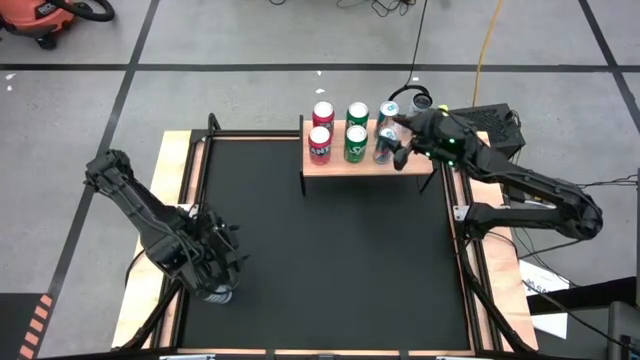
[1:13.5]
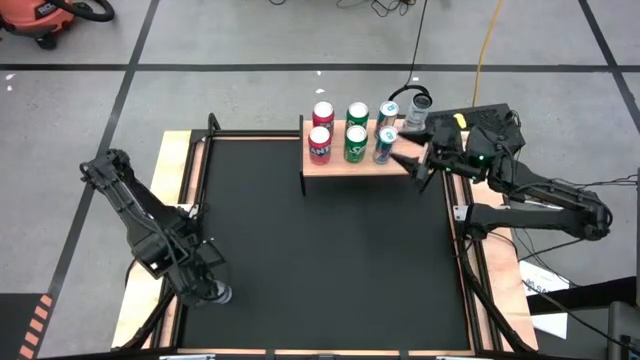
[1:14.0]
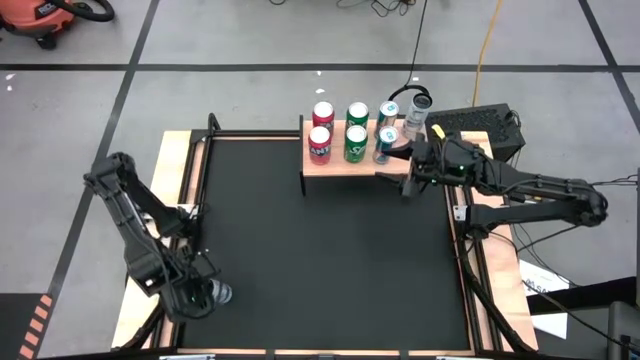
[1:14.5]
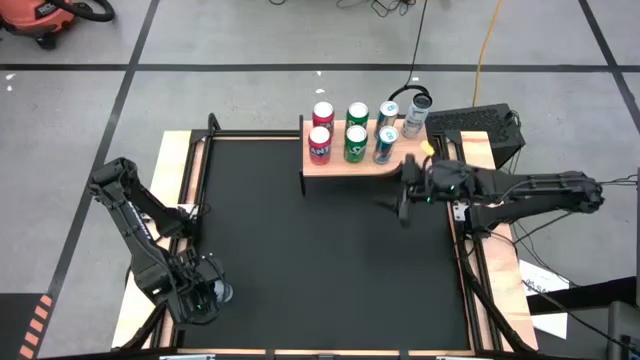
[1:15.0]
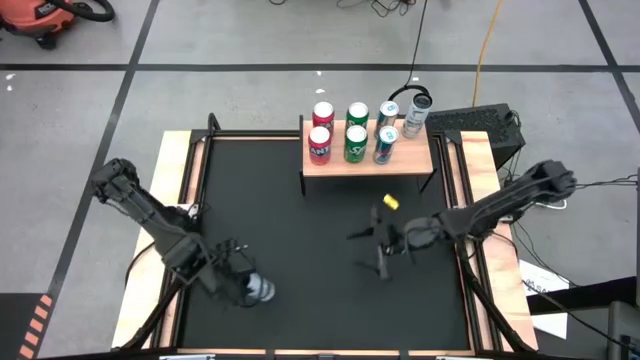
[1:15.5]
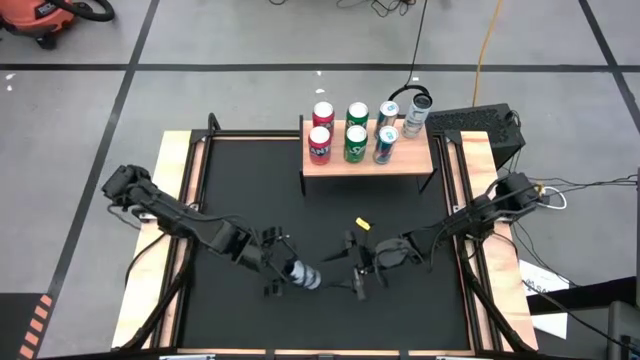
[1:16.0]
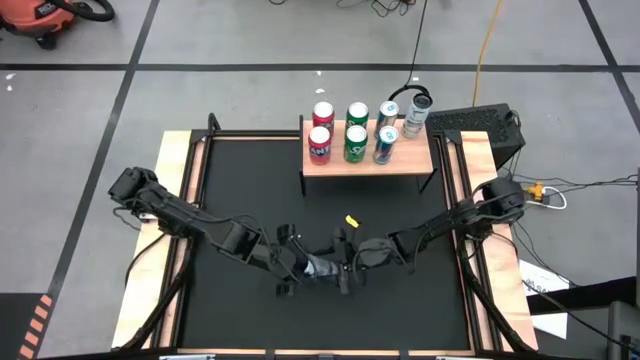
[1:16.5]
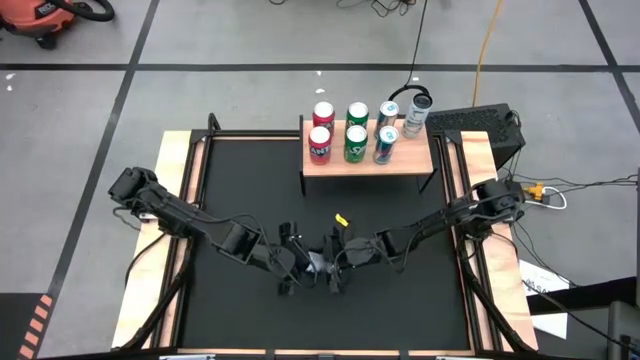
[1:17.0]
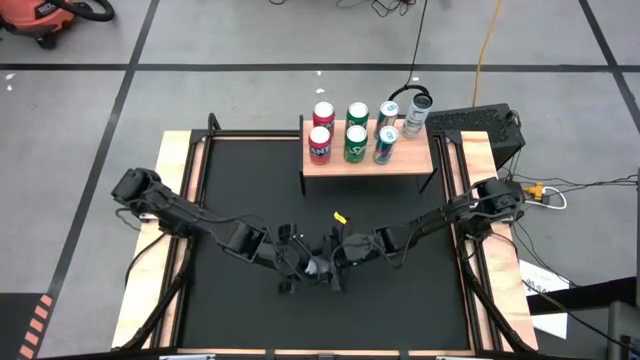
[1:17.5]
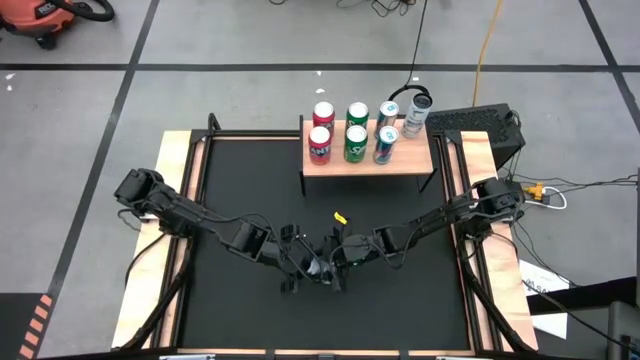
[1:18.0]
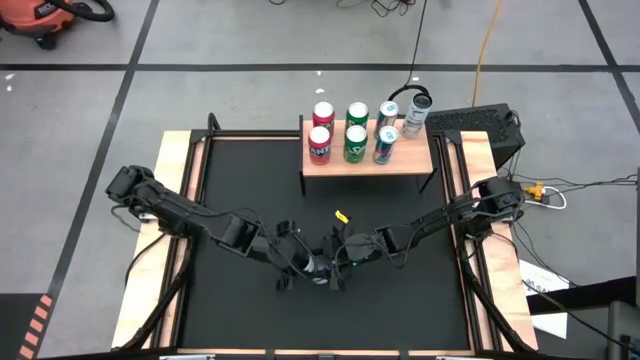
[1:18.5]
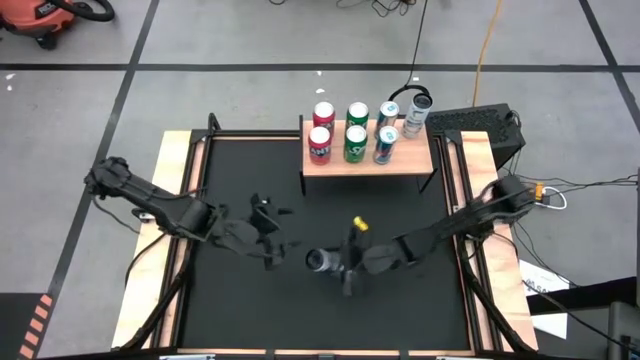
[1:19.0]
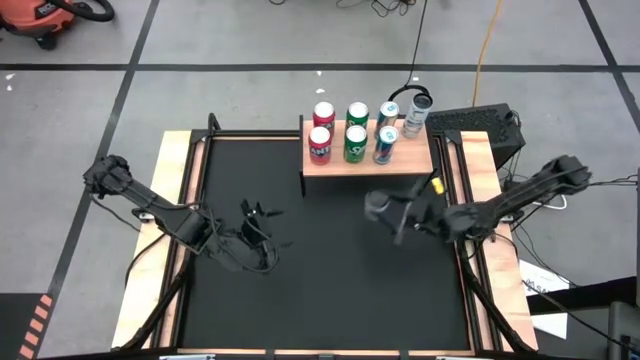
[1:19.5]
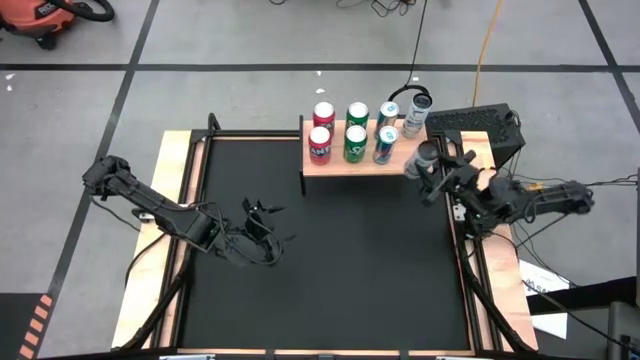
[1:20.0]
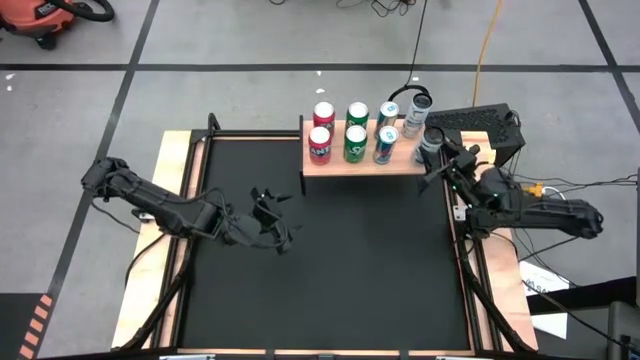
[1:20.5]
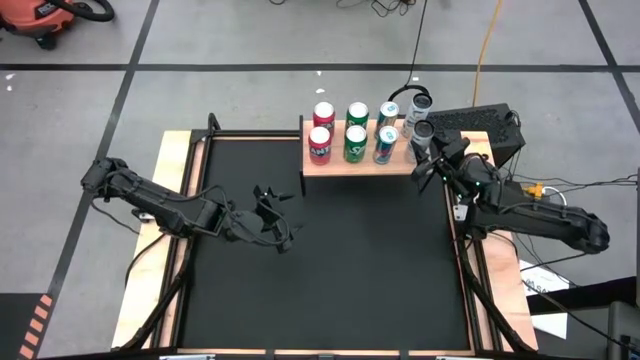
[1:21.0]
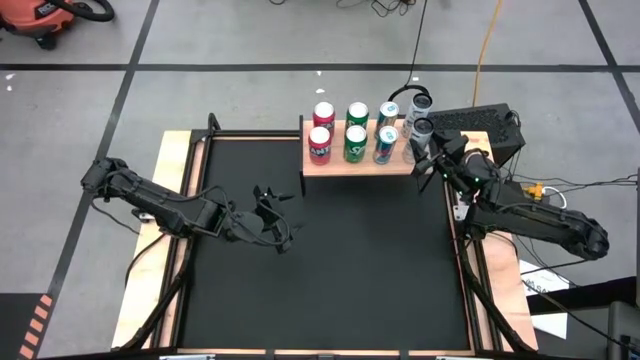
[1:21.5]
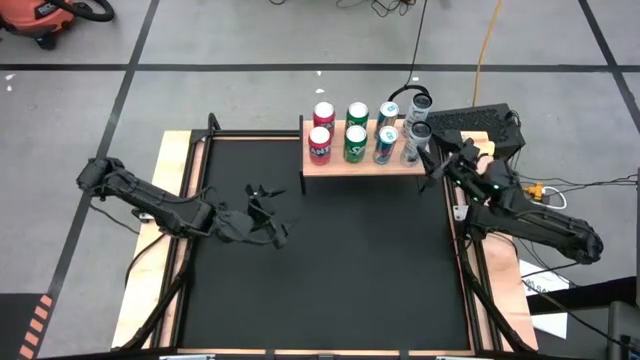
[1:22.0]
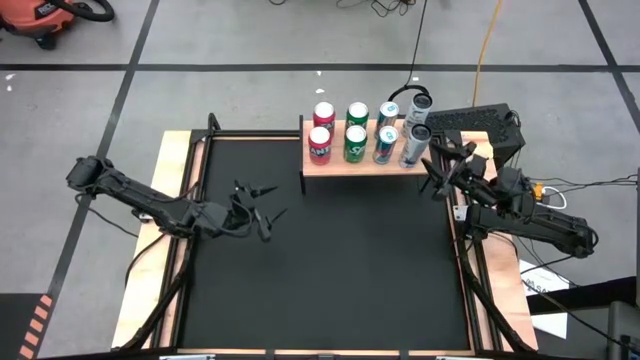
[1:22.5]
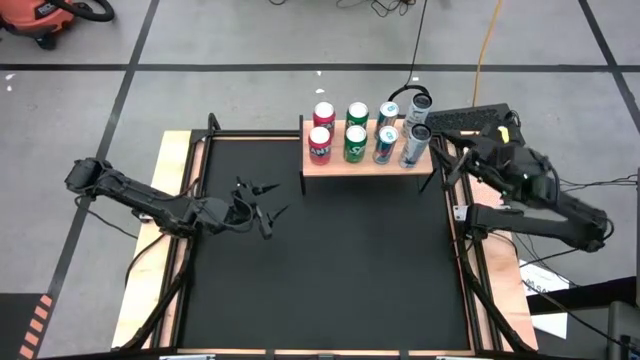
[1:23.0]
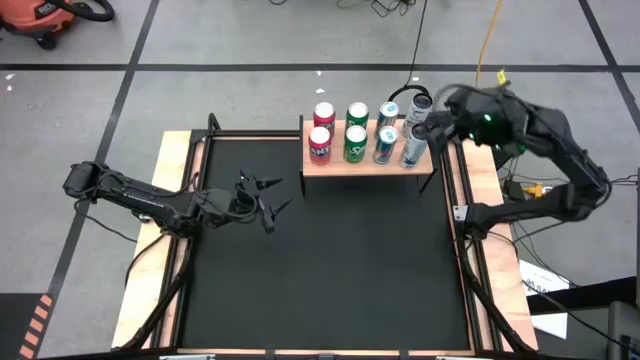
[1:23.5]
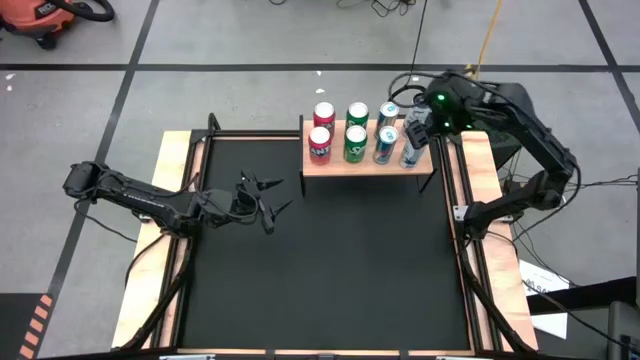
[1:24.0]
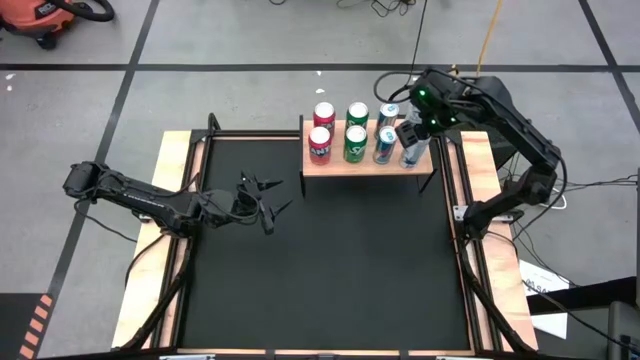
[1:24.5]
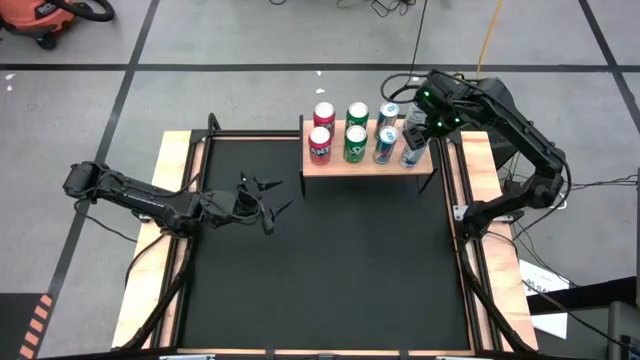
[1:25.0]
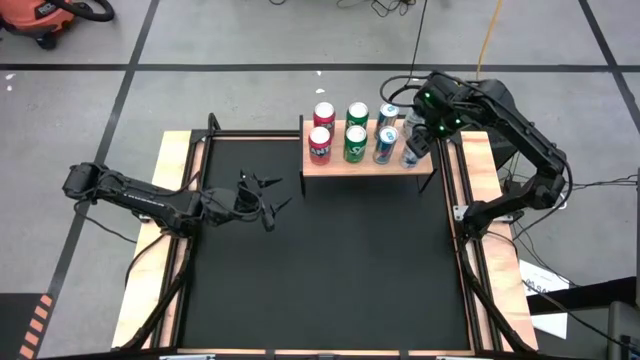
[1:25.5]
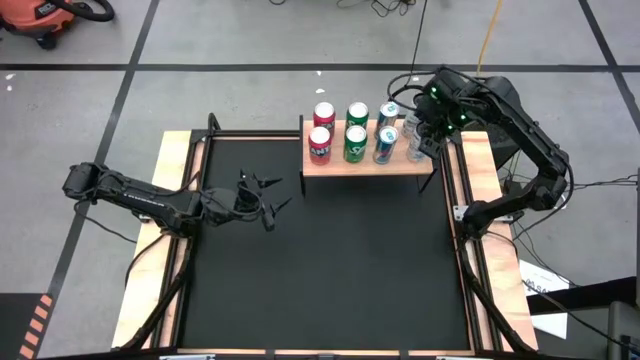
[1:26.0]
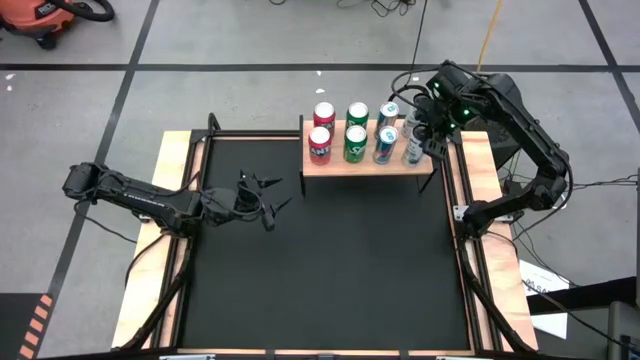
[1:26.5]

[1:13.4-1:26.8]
Task: Place canned beverage on shelf
Put the white blue soda can on the shelf aligned with the other white blue soda can

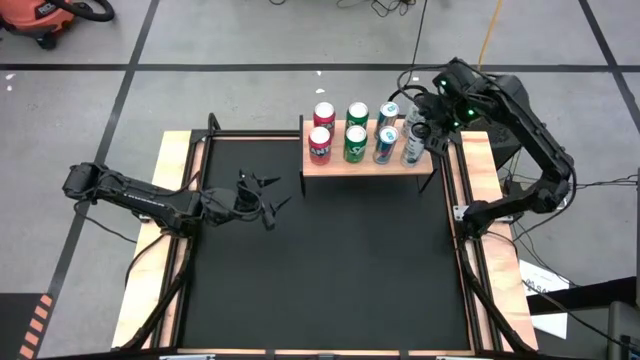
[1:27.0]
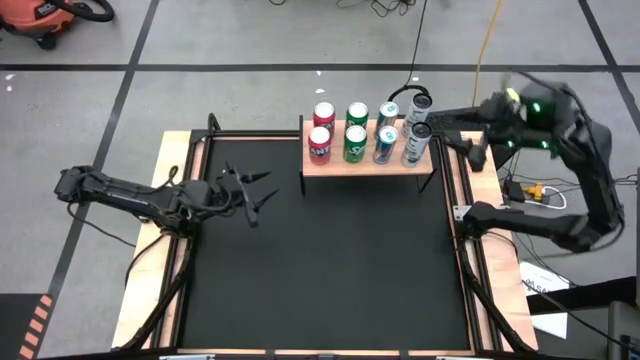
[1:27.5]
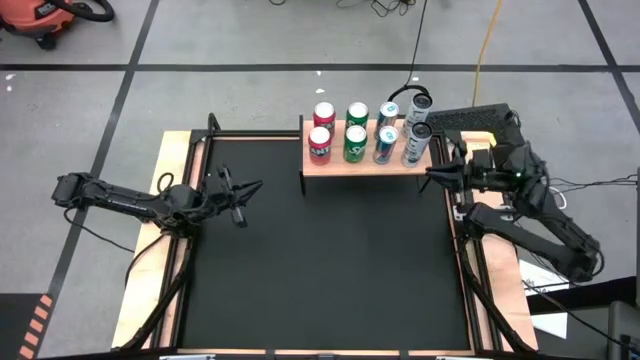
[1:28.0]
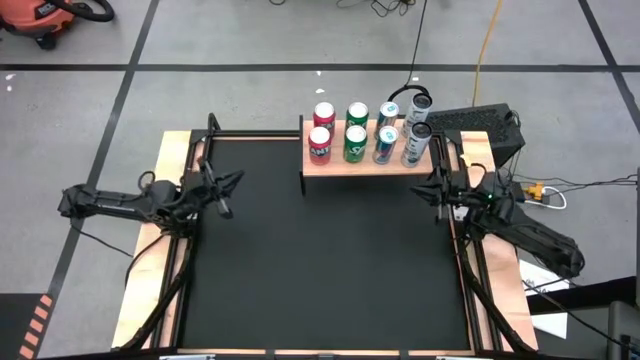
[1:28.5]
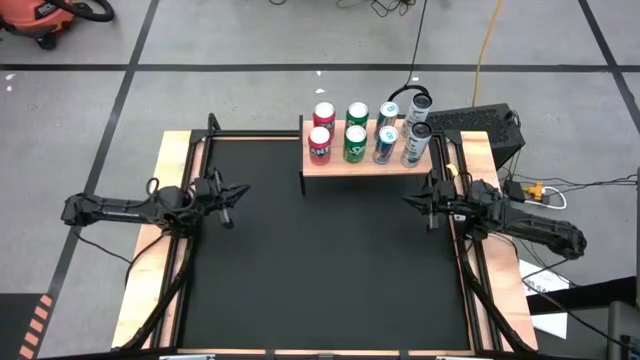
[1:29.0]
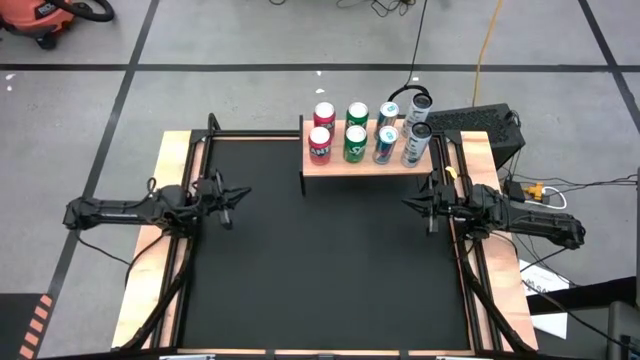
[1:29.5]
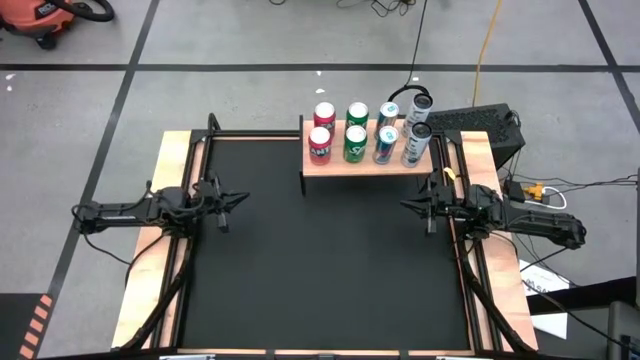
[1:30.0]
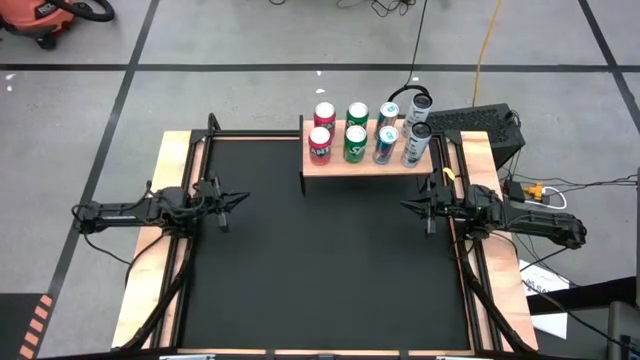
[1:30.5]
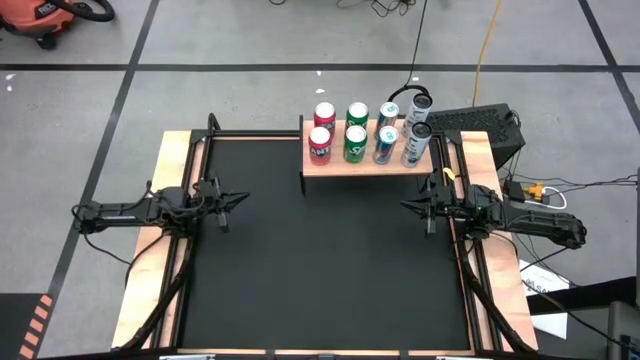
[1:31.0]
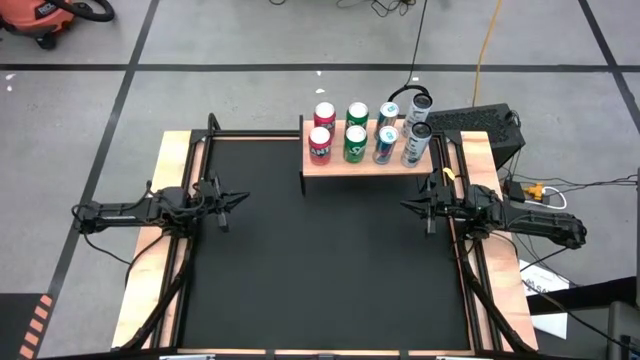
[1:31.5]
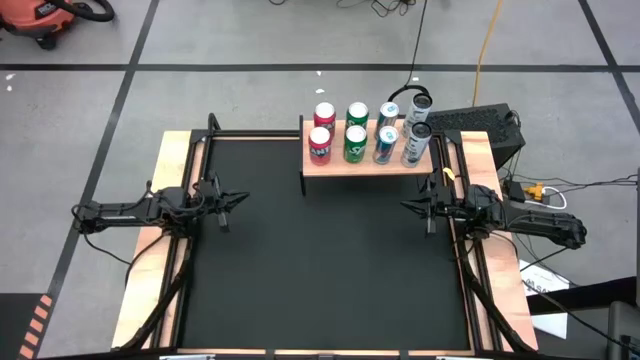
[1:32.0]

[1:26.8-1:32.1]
Return to Home Position

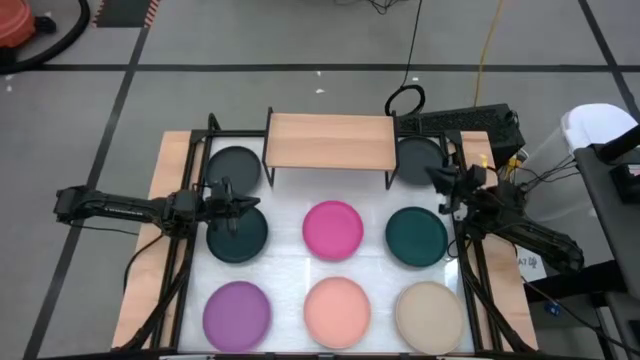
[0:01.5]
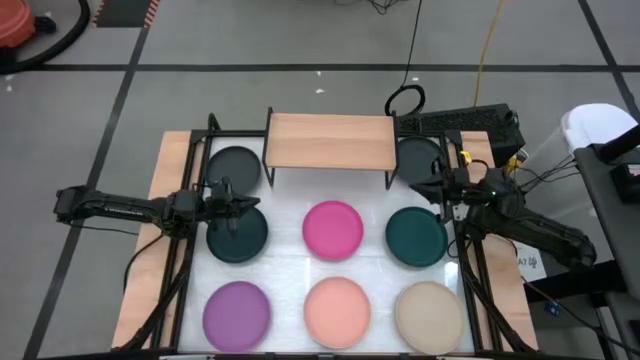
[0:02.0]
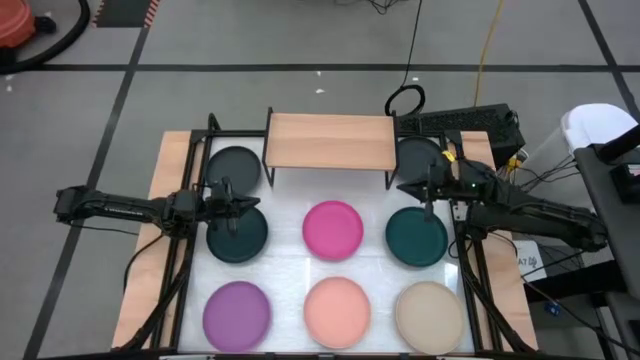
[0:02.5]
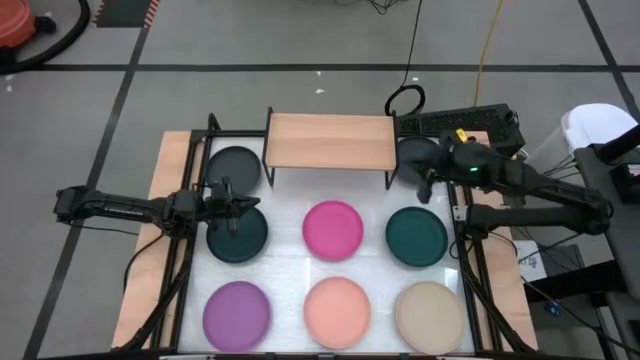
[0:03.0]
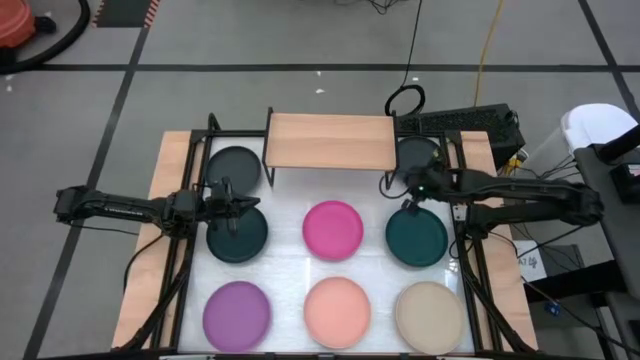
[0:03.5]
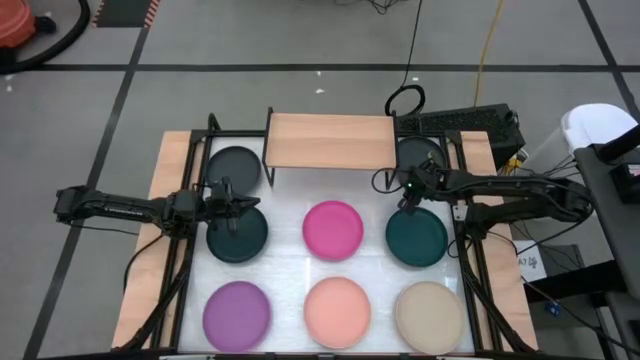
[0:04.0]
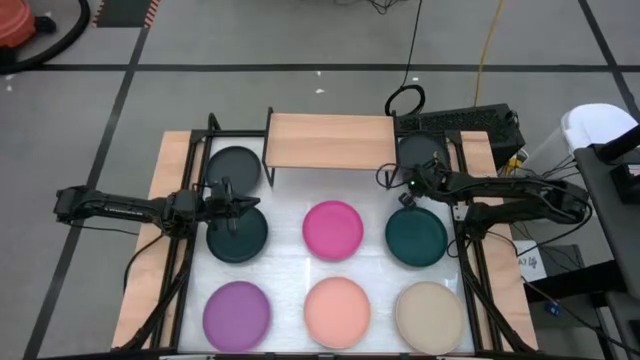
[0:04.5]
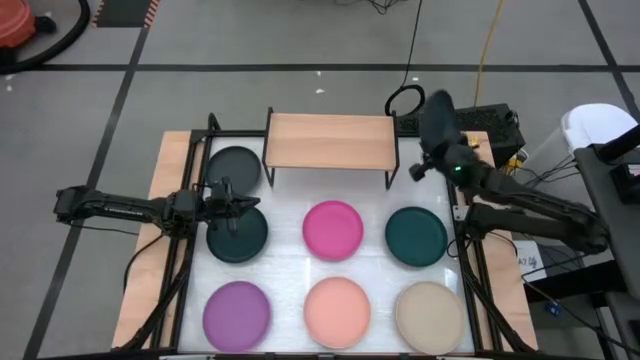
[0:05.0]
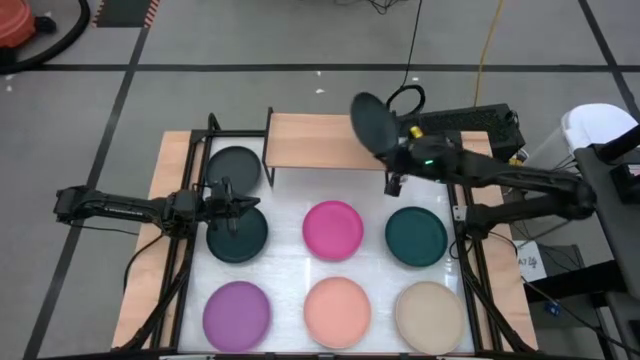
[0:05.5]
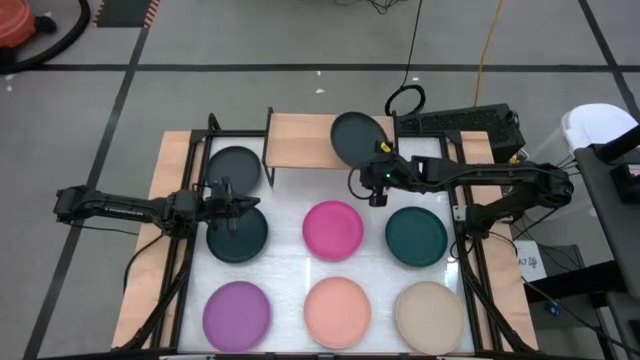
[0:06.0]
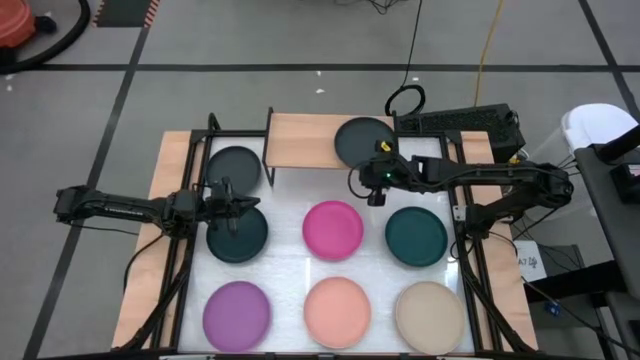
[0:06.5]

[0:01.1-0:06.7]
Task: Place and stack plates onto a shelf
Put the right black plate on the shelf
